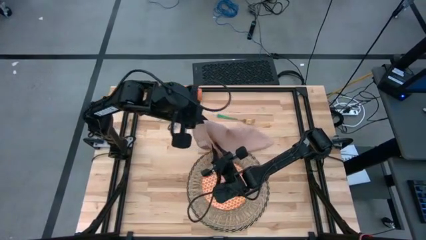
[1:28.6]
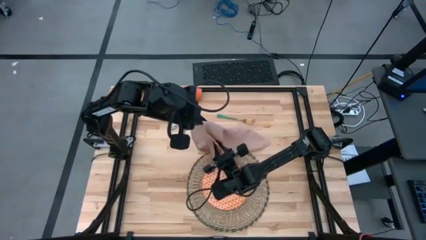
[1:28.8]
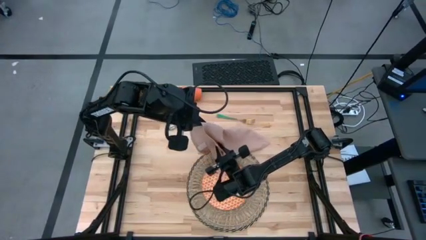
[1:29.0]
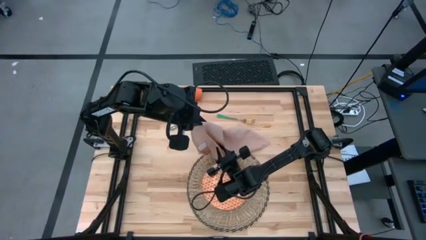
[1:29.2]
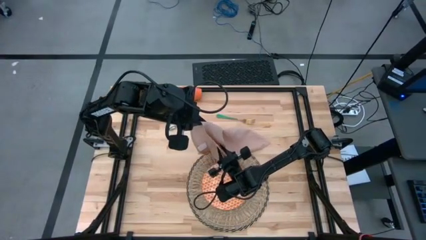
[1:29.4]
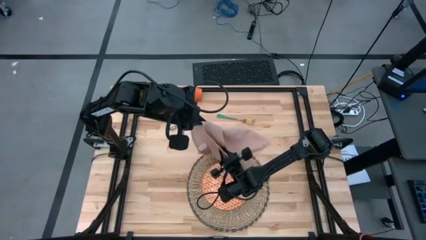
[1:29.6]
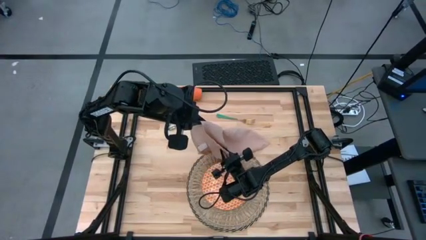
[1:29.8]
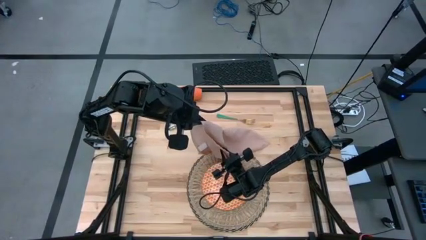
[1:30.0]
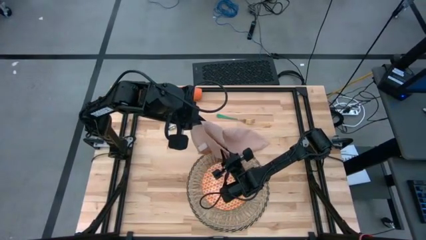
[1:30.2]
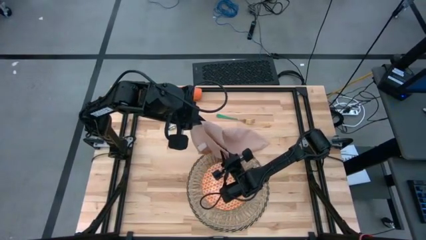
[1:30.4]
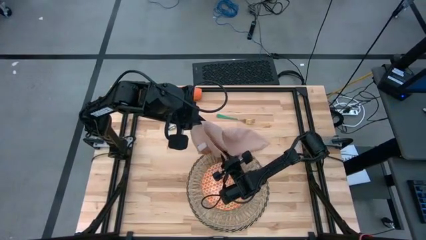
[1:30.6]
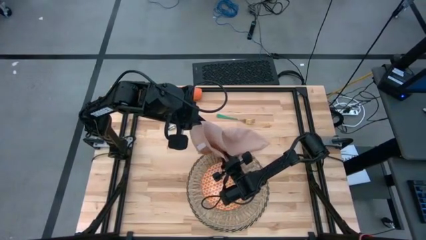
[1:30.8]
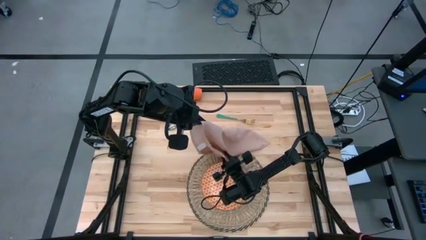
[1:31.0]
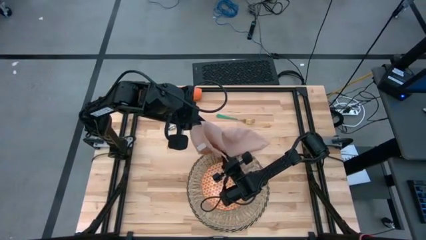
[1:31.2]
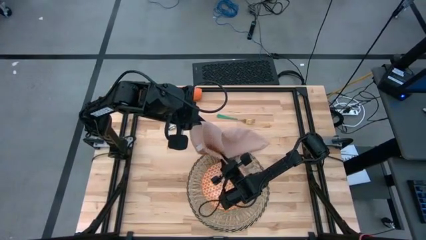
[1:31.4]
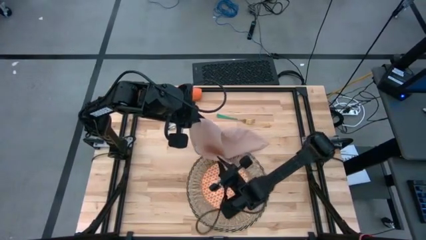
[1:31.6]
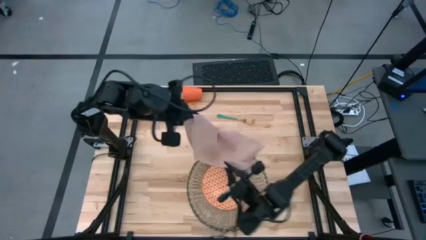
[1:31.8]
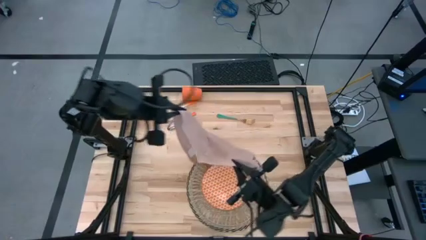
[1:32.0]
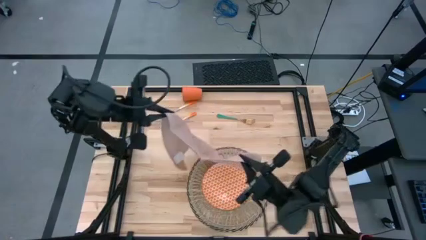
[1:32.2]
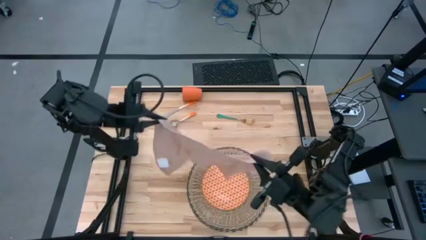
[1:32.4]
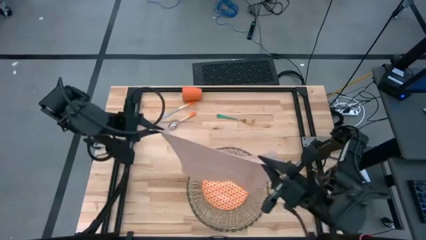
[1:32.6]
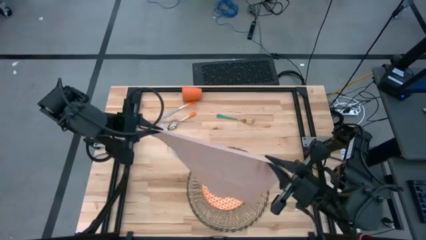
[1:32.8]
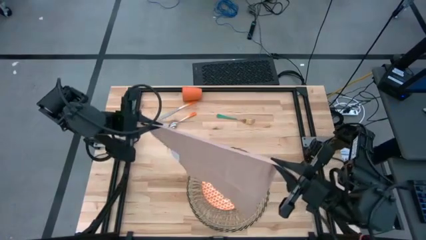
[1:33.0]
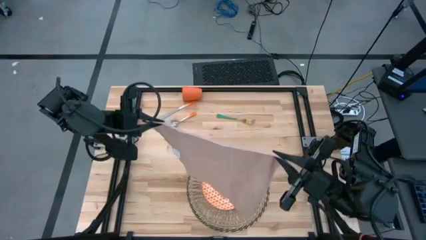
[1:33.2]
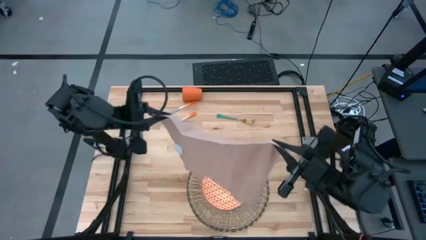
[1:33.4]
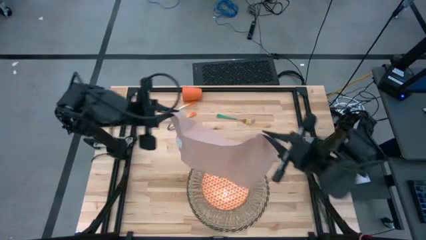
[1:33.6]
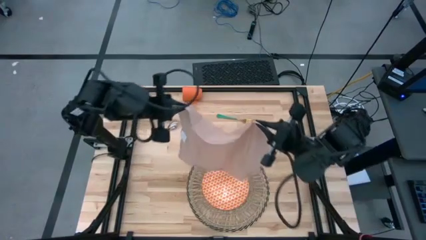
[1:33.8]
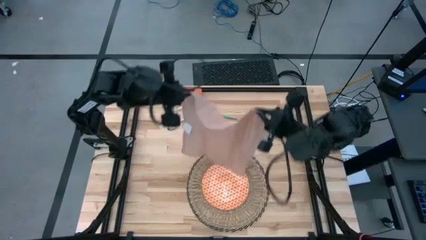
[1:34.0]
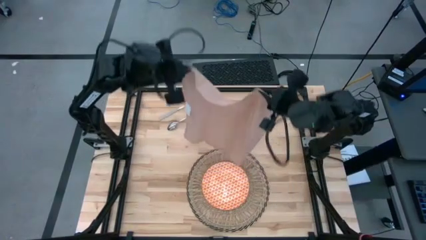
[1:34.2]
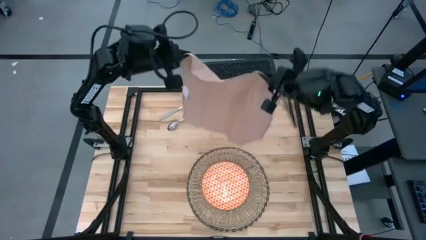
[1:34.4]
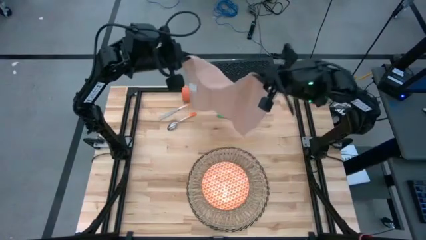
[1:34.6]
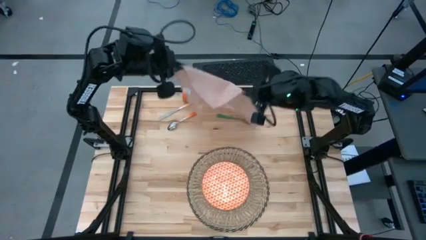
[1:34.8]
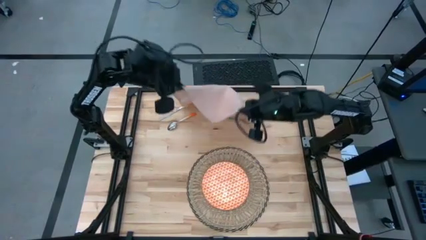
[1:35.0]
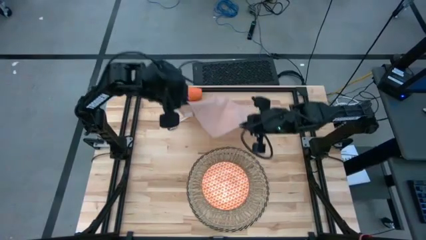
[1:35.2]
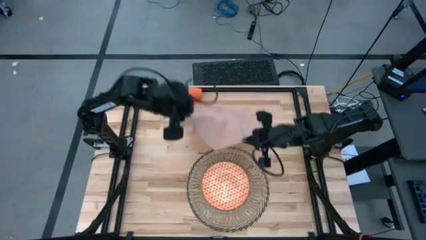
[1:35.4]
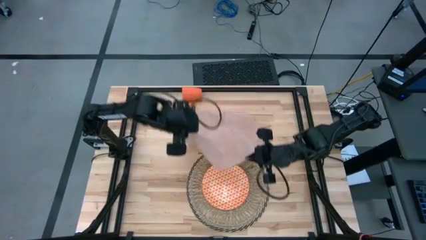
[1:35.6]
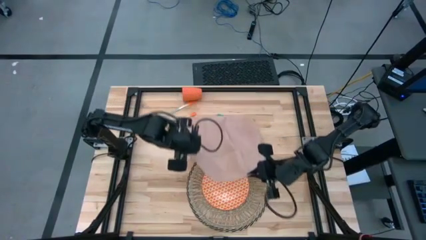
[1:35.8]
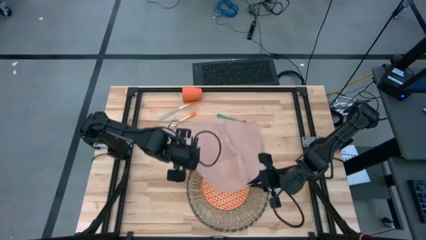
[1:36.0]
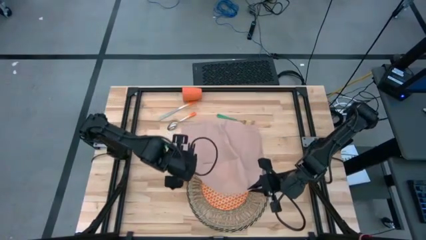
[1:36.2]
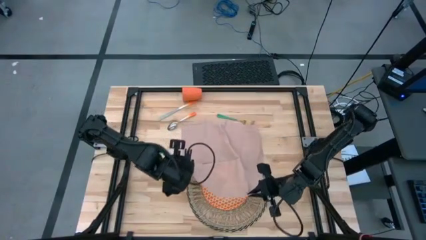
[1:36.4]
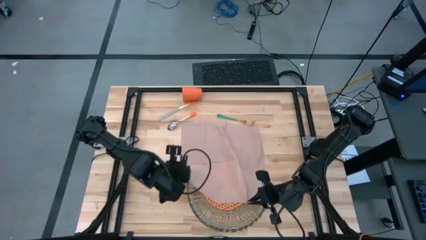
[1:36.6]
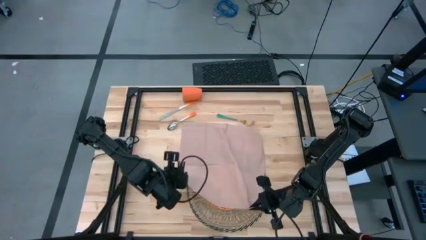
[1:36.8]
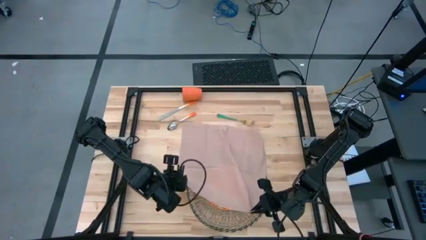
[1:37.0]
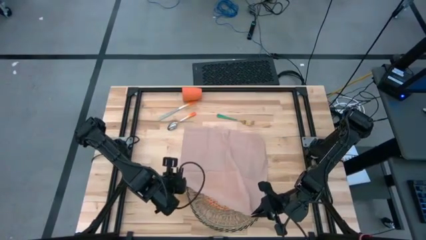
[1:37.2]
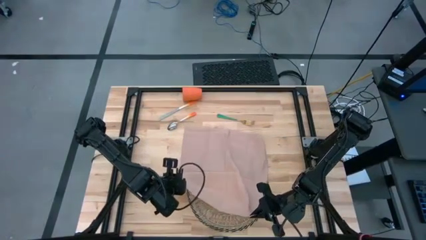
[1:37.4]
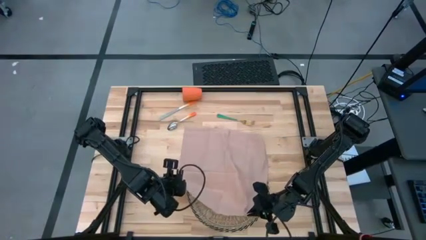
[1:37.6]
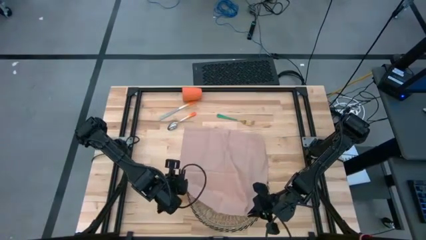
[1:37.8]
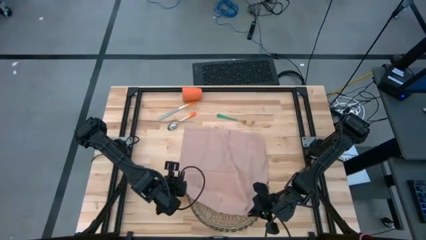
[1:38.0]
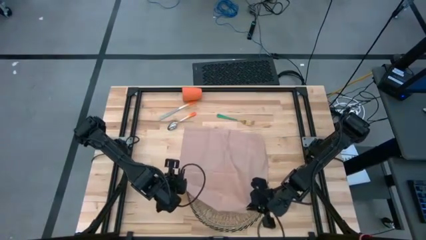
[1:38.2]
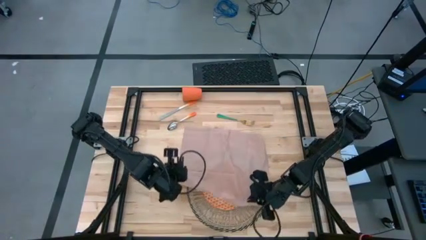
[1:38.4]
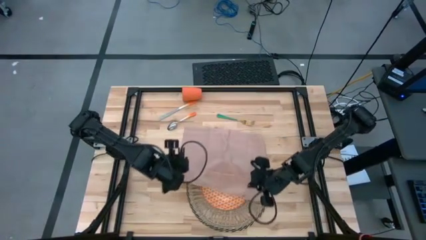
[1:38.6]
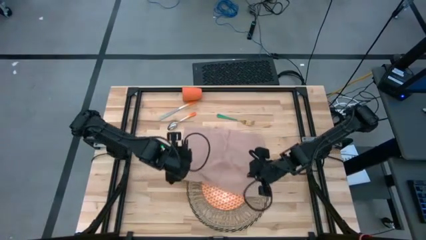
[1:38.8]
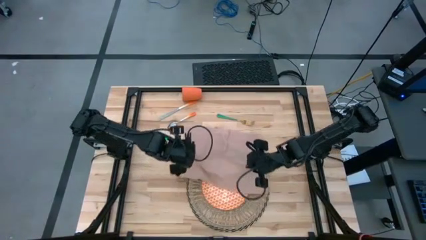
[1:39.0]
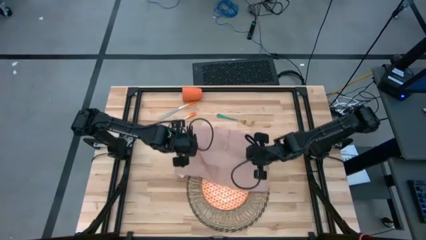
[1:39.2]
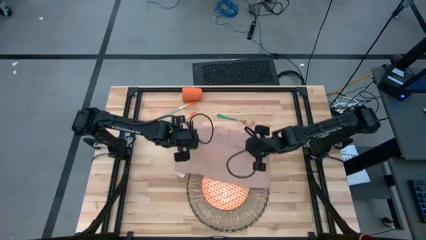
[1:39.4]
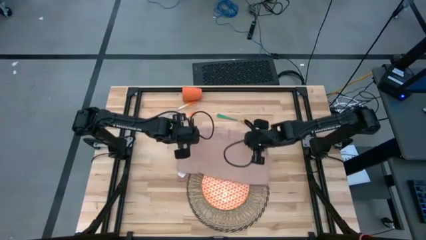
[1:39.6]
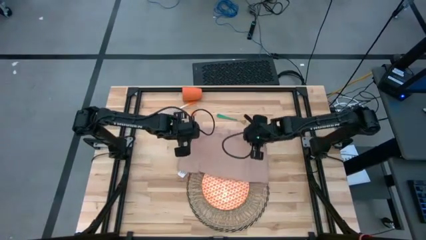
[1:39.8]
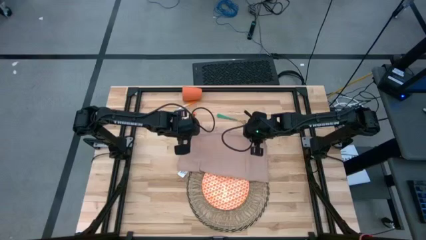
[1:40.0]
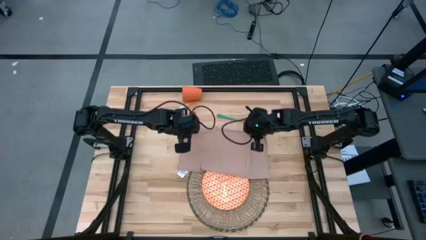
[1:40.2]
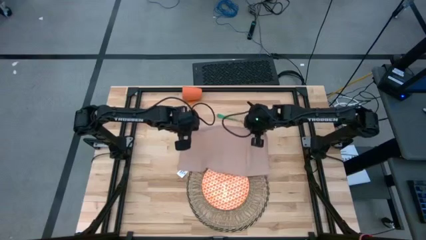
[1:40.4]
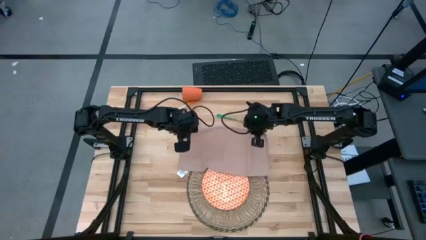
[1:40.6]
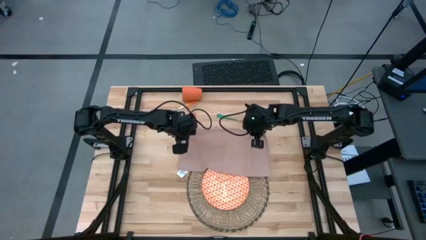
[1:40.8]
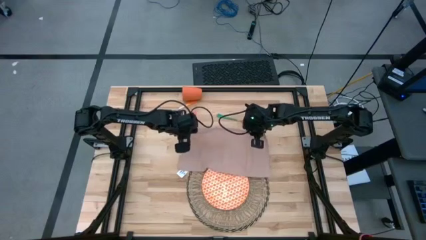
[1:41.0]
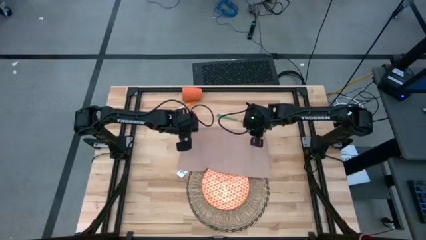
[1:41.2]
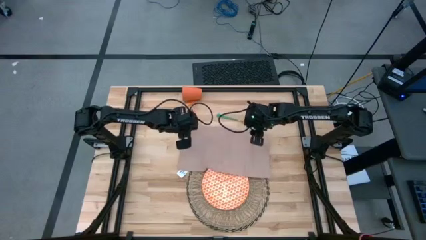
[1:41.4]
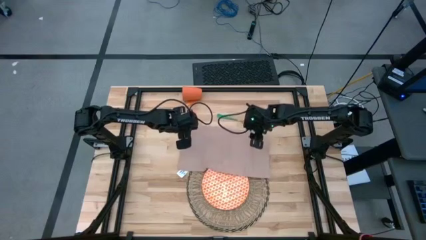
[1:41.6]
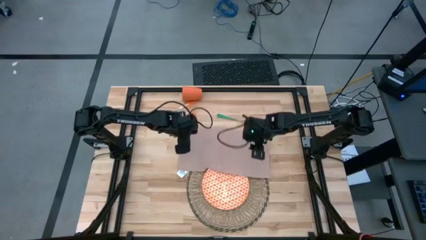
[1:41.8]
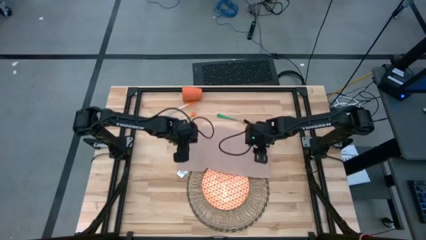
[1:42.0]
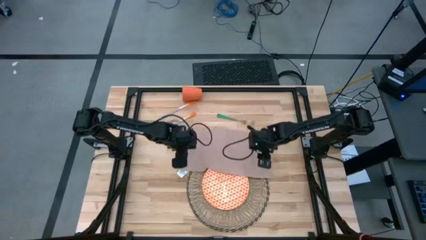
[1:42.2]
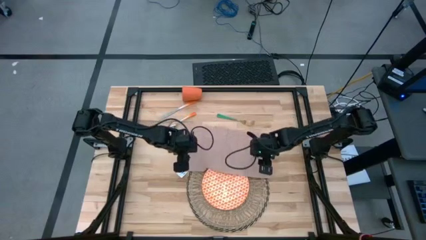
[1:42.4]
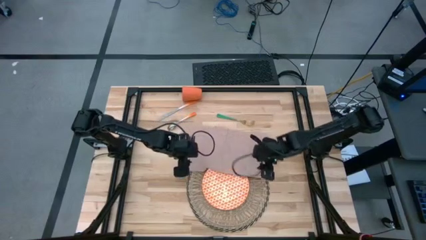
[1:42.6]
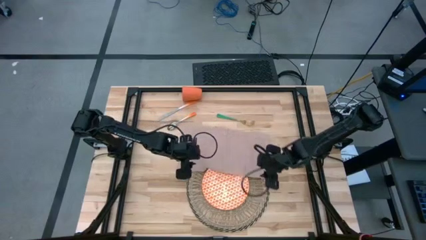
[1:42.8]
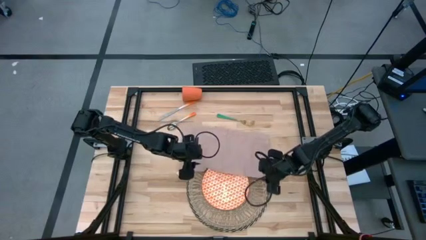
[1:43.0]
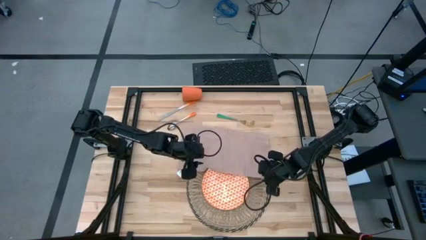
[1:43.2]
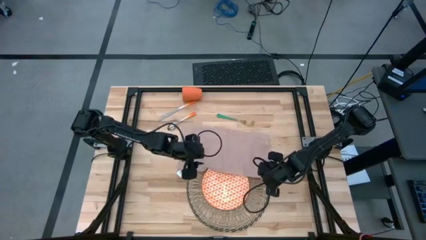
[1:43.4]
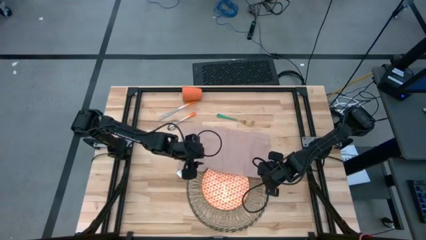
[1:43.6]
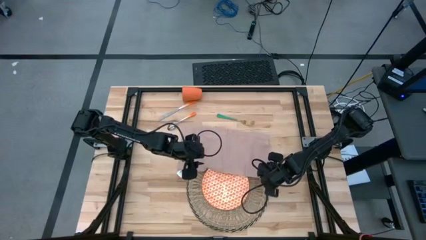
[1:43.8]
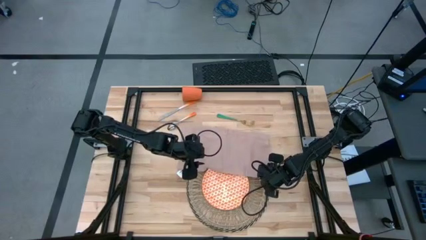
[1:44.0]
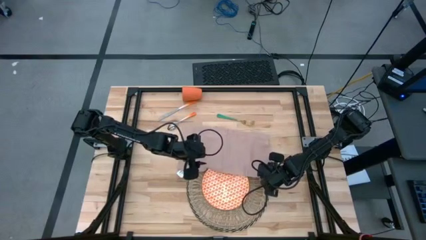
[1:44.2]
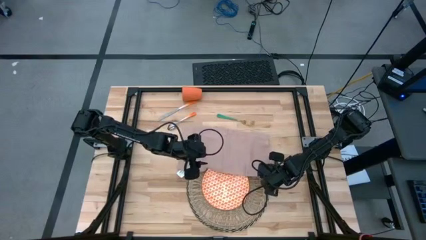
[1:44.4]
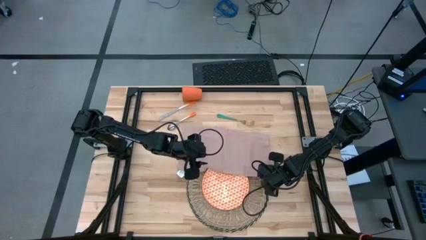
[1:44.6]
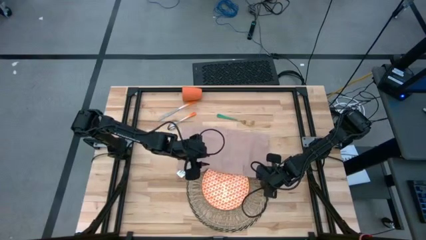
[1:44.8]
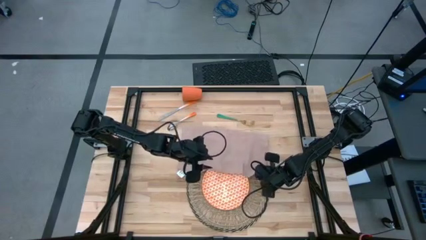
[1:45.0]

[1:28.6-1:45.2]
Task: Set table place
Fold the napkin
